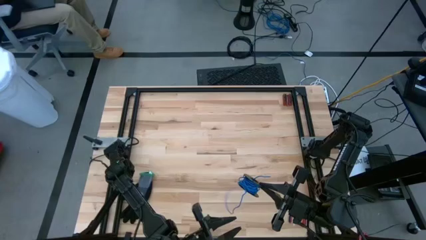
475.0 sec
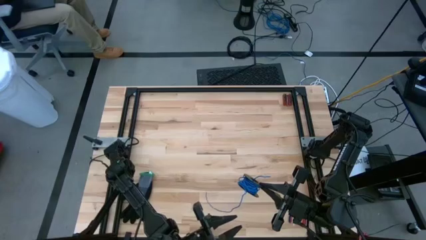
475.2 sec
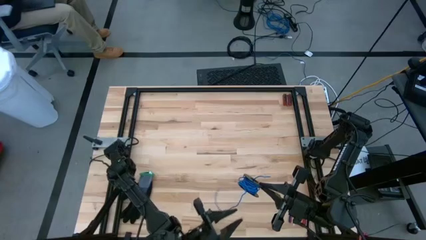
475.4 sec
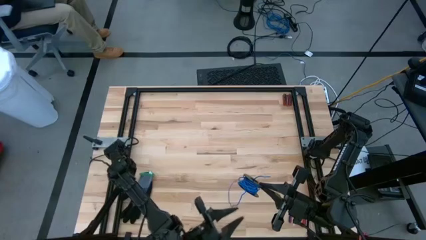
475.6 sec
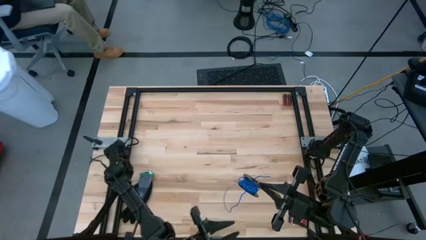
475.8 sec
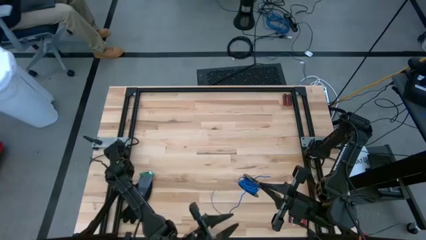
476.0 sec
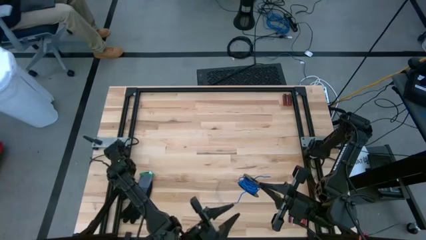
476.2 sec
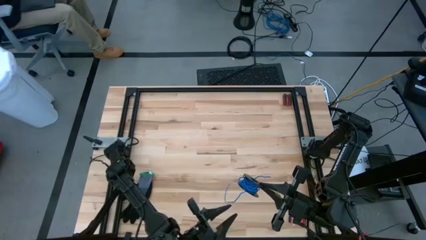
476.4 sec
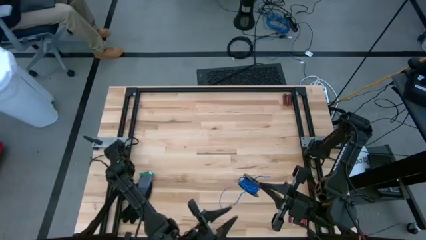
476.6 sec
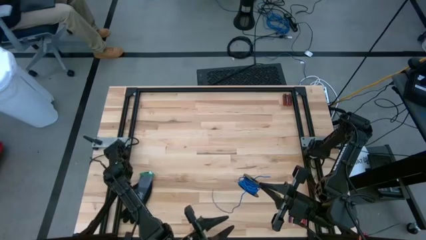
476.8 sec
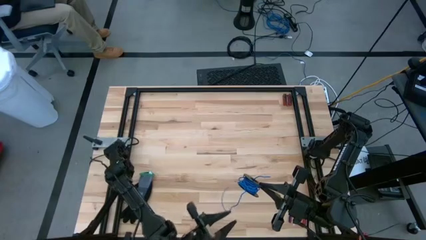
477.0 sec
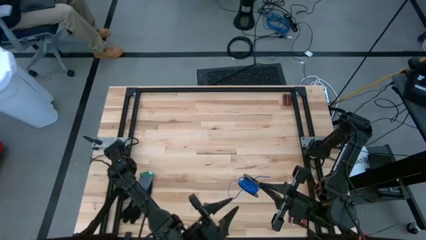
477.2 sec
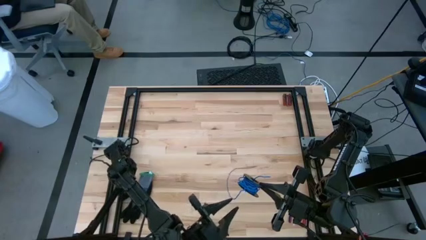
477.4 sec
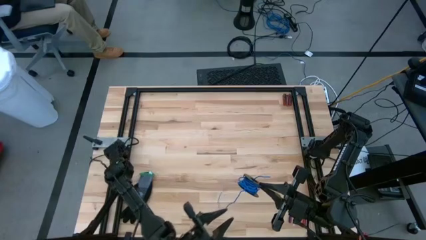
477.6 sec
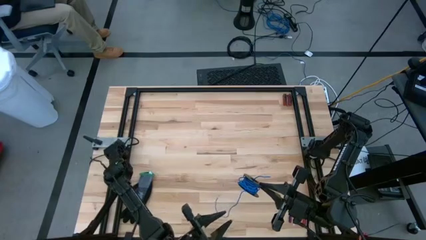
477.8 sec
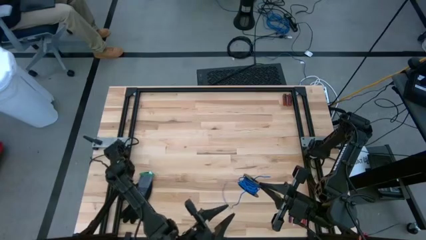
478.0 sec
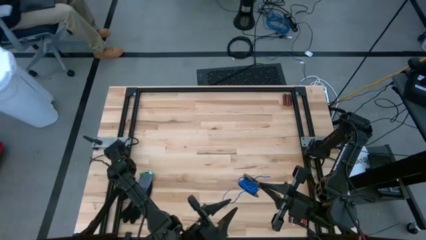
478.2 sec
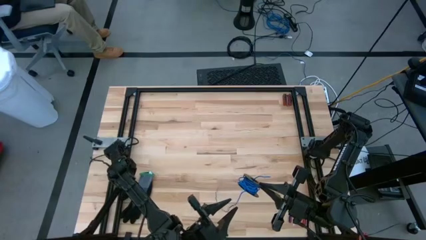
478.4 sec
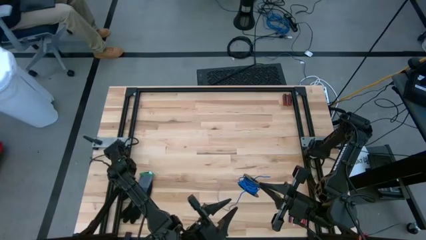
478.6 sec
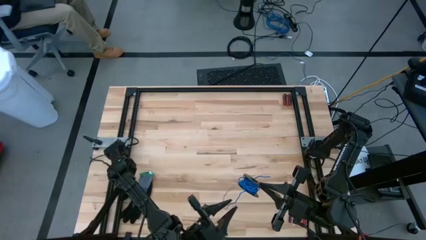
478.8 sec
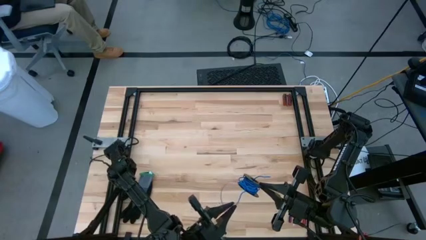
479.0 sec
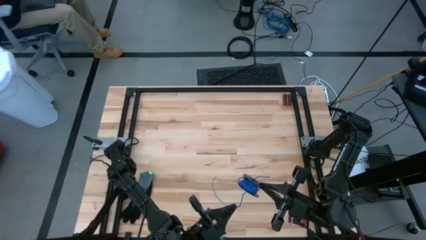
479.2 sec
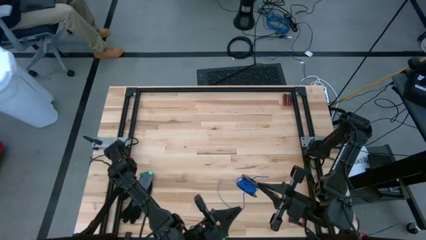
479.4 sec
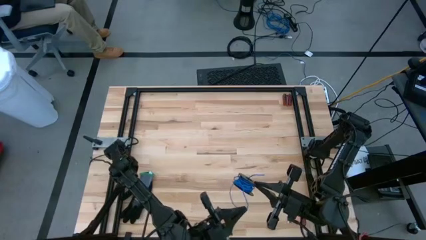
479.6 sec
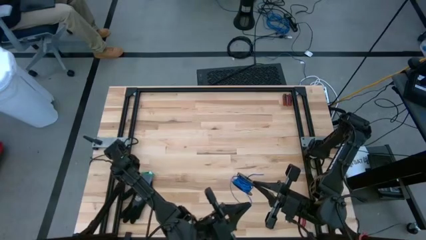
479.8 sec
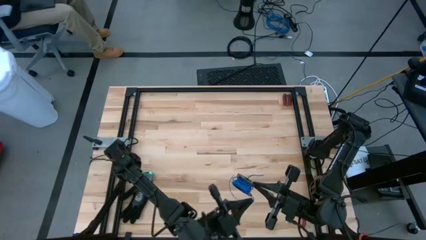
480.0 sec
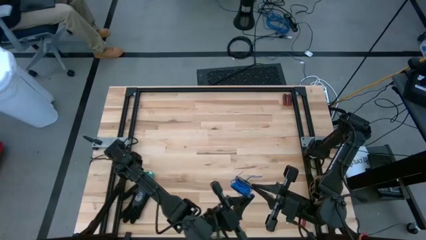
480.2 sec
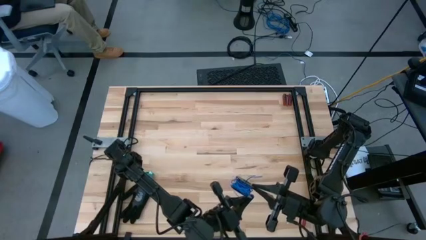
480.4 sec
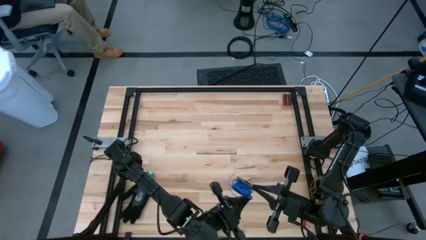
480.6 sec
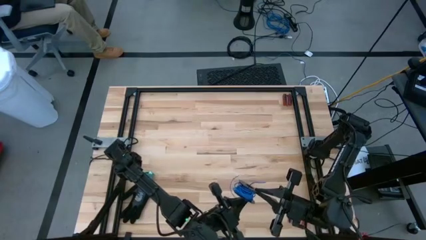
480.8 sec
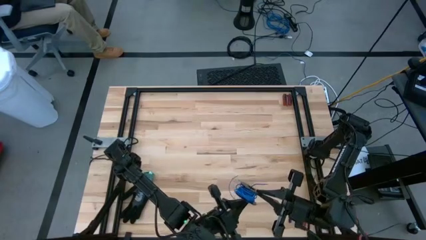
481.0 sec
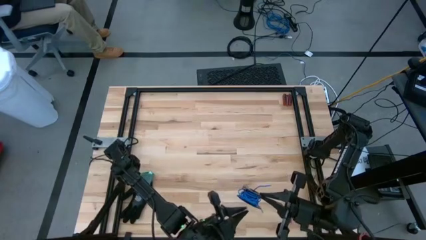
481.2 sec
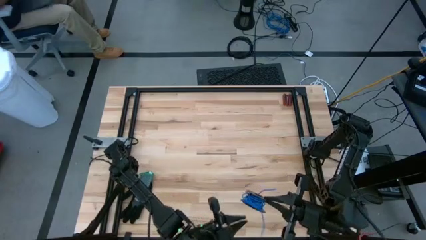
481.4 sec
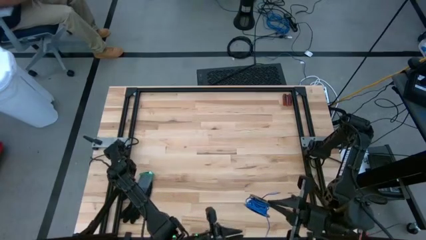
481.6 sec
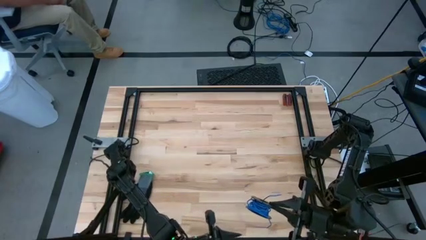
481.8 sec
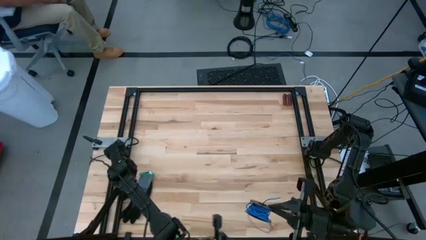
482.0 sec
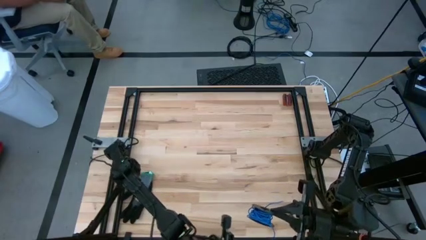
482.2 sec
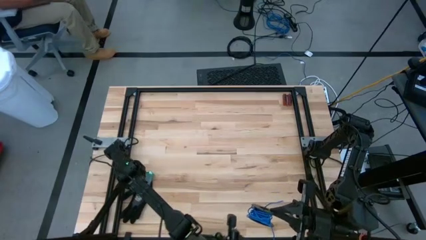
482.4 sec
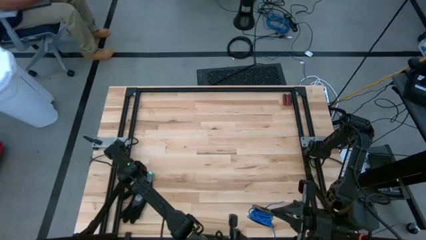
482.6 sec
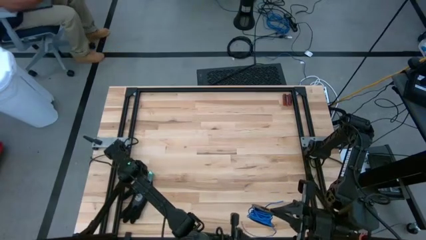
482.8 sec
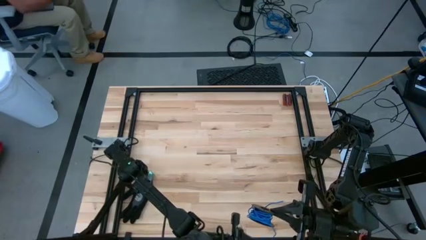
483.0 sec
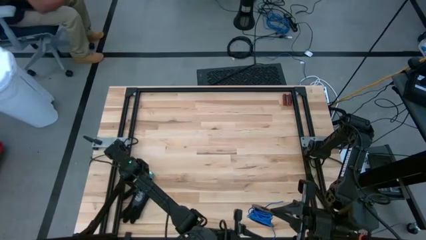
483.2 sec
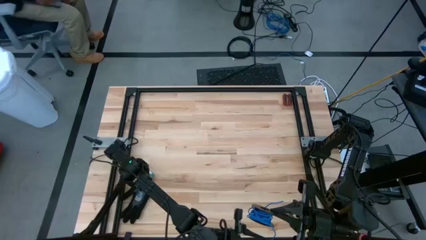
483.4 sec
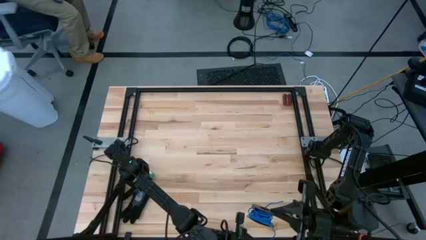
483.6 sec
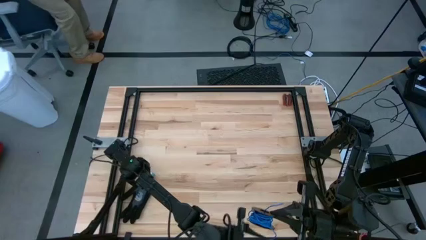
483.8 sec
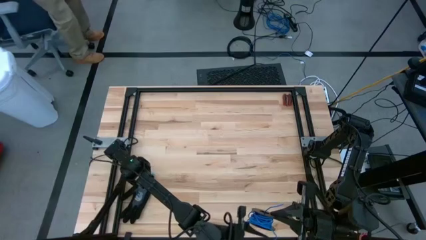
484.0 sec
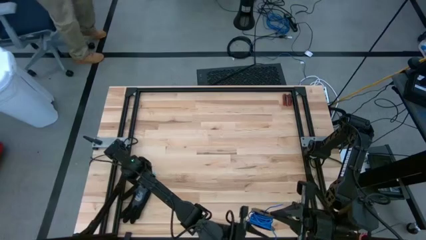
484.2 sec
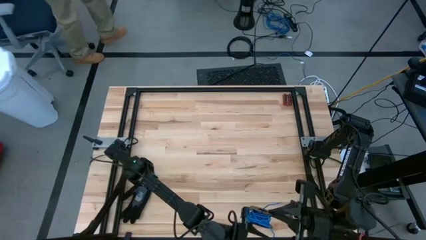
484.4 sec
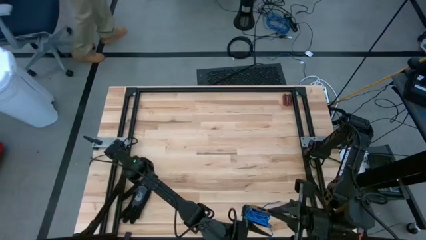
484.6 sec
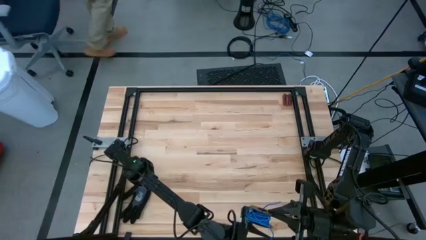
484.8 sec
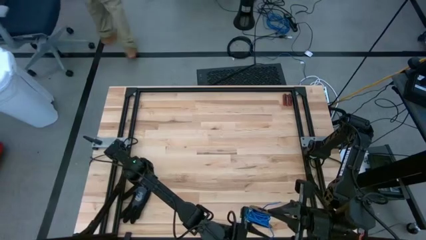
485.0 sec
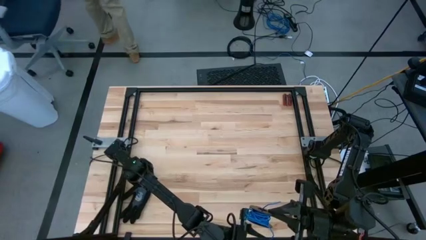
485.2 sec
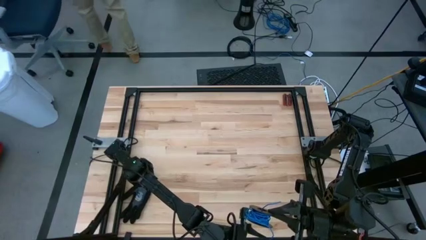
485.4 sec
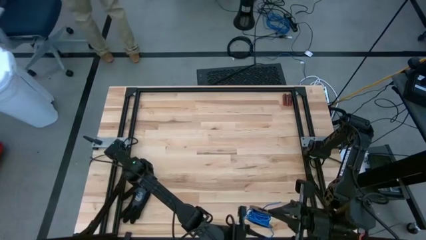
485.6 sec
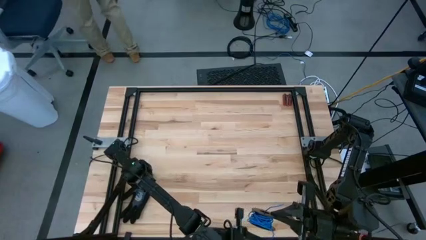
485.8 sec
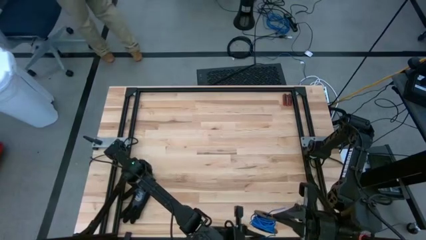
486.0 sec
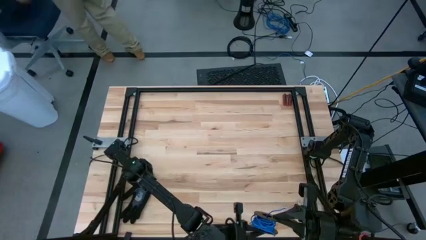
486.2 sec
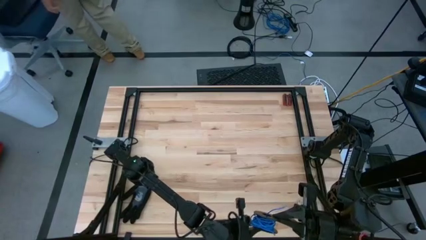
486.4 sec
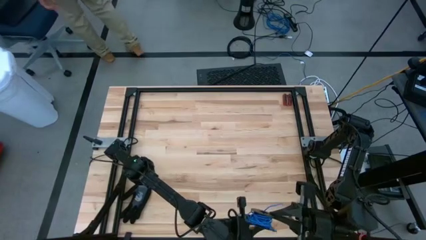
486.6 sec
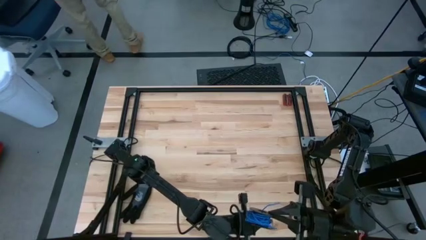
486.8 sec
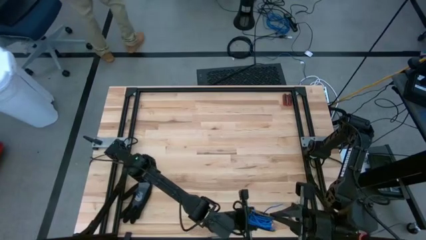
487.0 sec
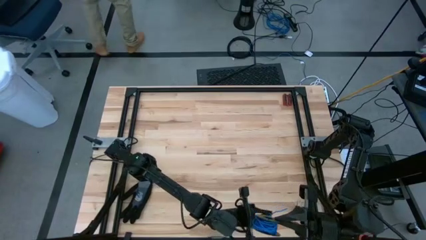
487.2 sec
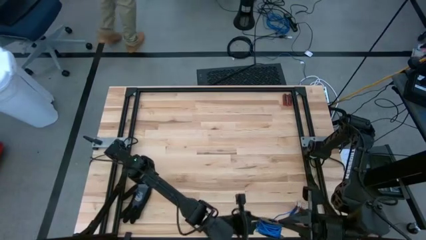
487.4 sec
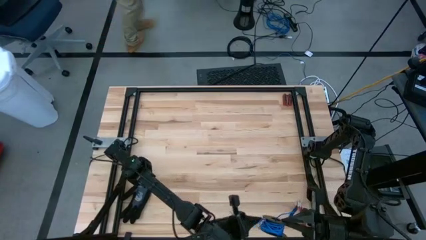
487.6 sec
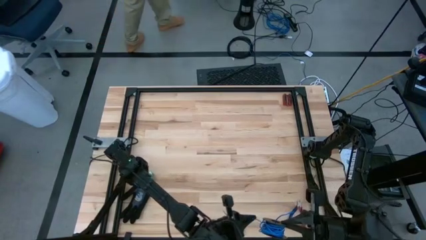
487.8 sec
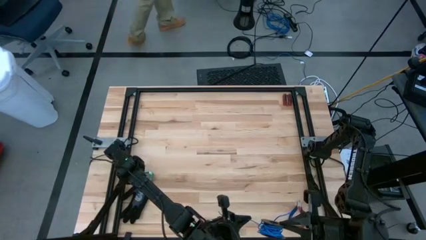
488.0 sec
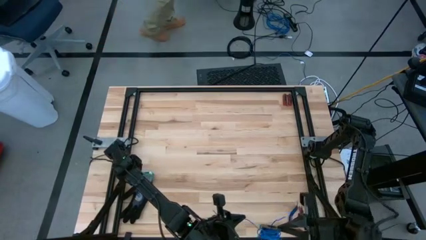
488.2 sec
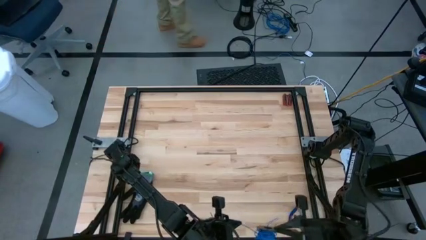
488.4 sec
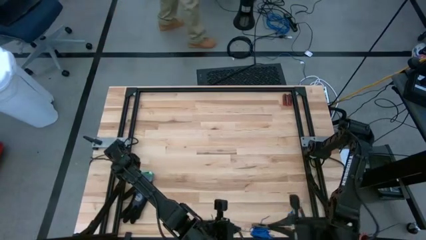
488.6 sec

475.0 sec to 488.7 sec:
Task: Coil cords
Coil the blue wire onto the spool

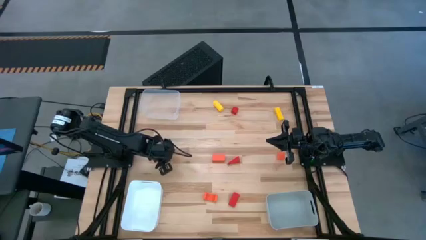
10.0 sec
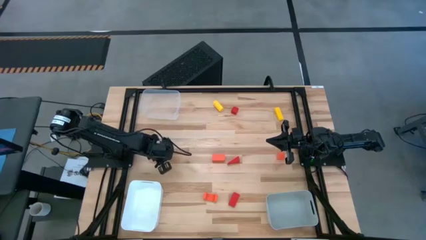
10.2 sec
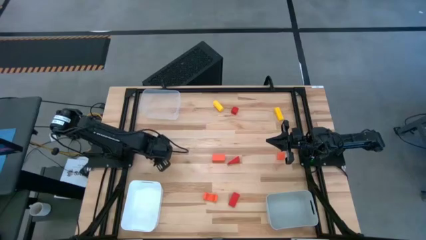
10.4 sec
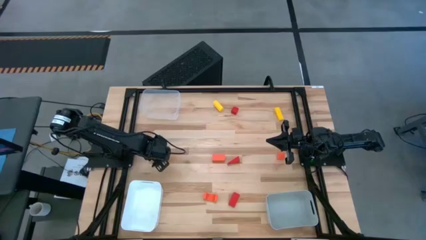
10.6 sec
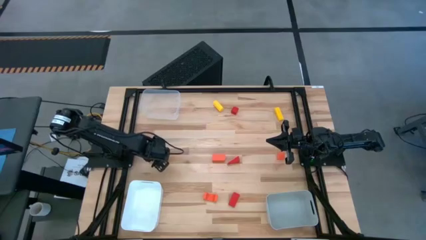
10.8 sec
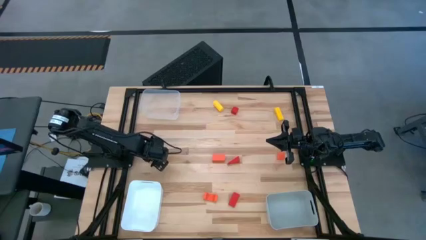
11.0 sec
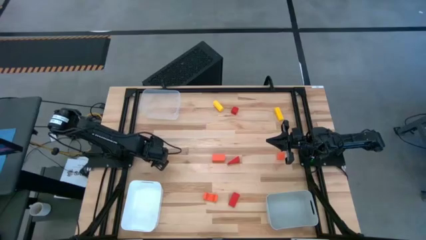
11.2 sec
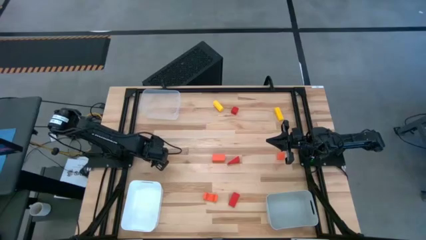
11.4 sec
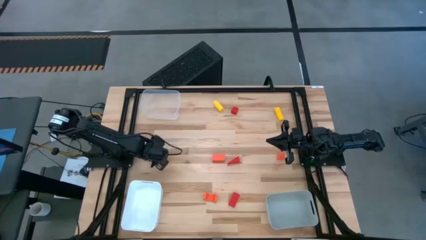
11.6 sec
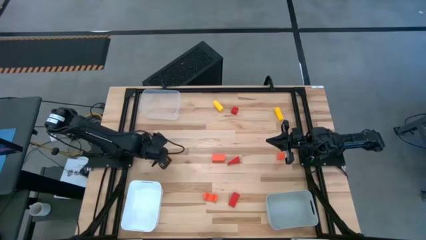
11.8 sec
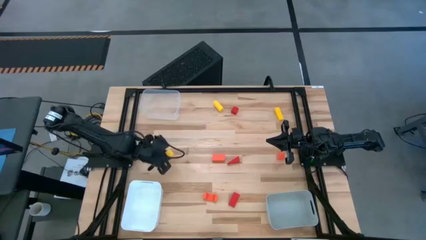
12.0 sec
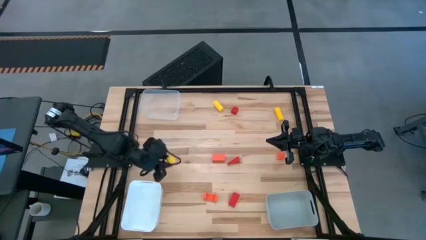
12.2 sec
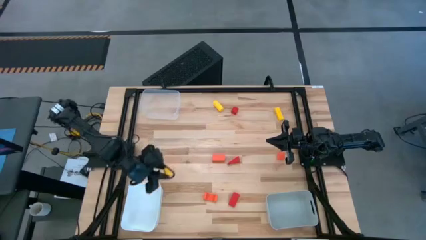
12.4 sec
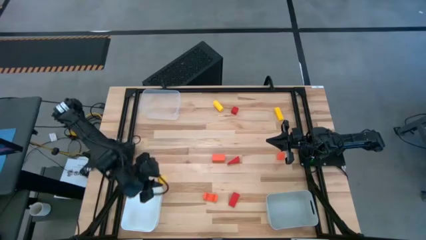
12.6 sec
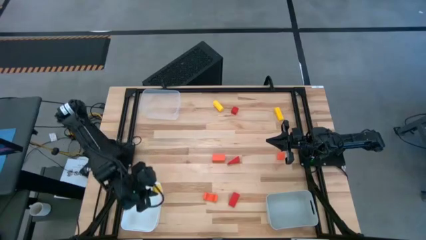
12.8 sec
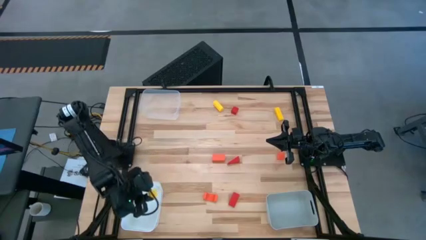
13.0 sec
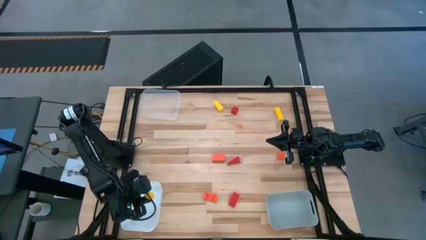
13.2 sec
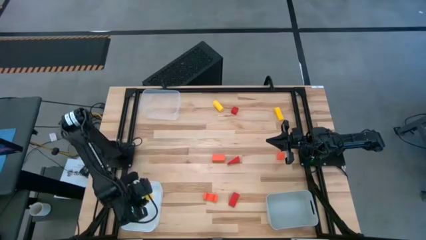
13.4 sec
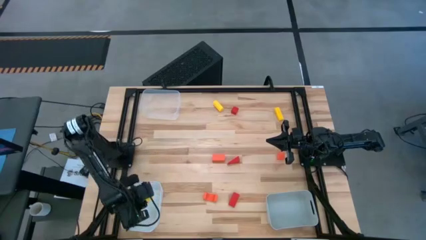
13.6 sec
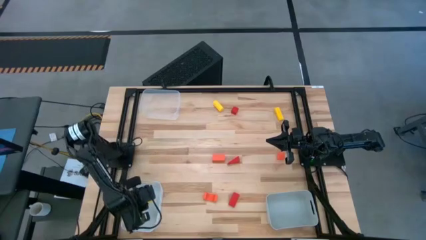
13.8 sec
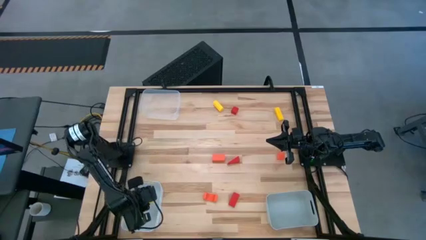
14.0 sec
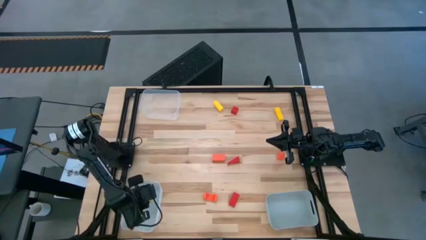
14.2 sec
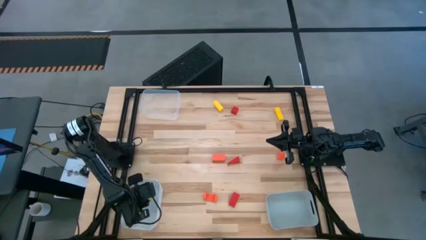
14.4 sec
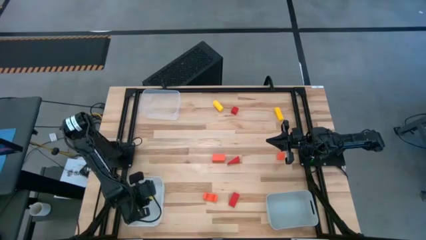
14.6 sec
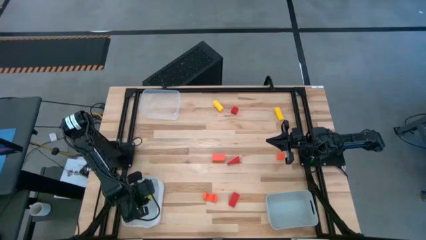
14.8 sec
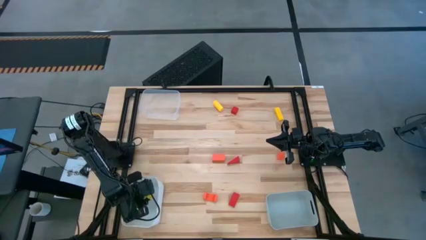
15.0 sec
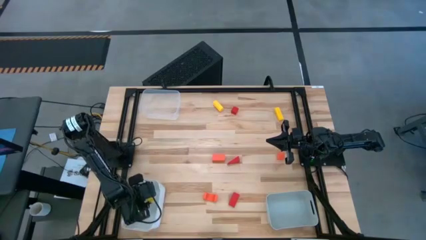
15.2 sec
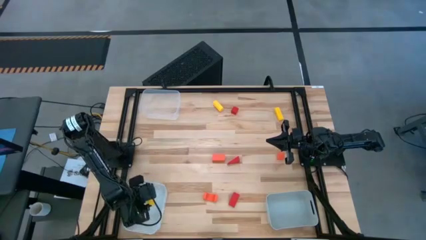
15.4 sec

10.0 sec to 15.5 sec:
Task: Sort & place blocks by color
Put the left yellow block into the white bin
